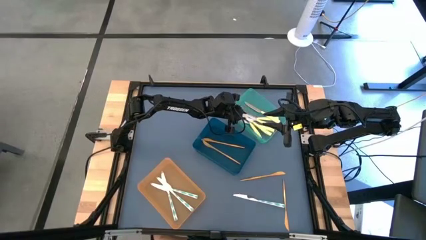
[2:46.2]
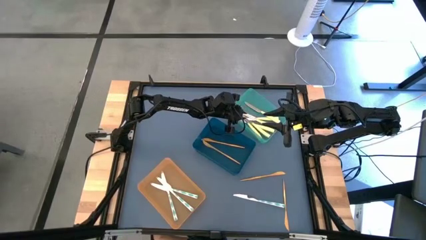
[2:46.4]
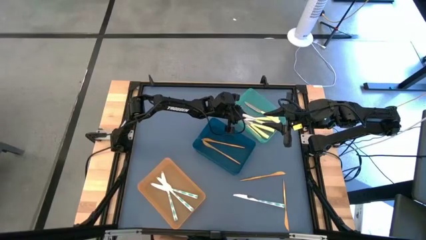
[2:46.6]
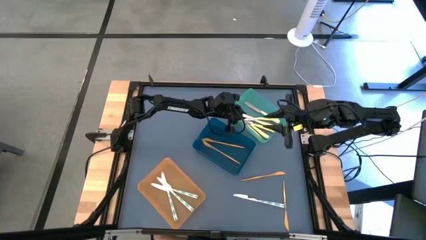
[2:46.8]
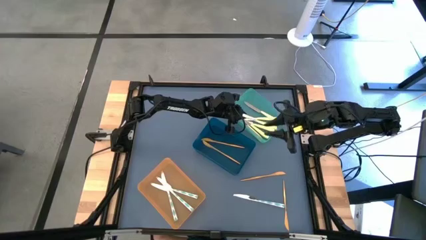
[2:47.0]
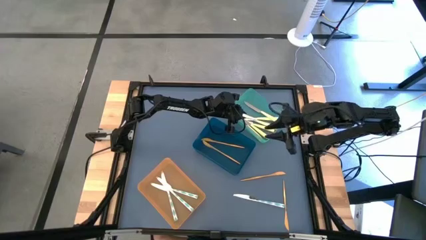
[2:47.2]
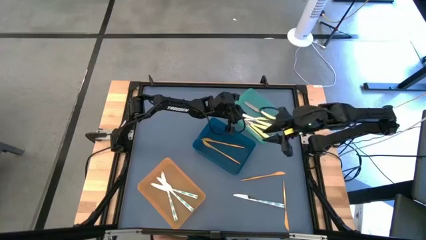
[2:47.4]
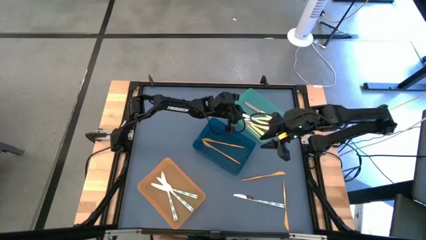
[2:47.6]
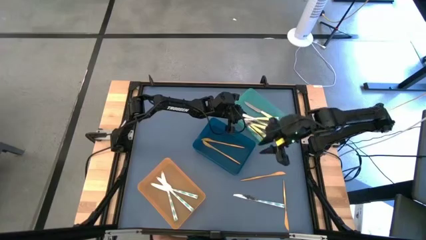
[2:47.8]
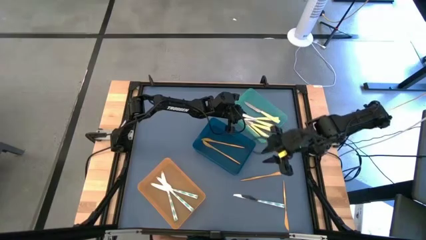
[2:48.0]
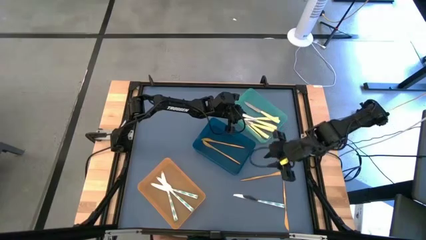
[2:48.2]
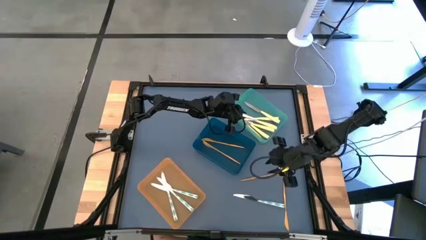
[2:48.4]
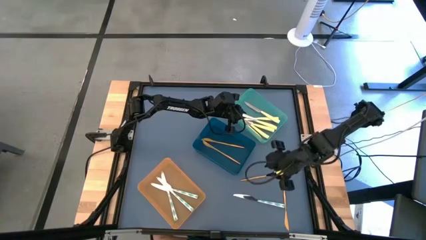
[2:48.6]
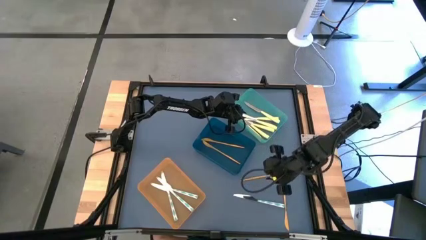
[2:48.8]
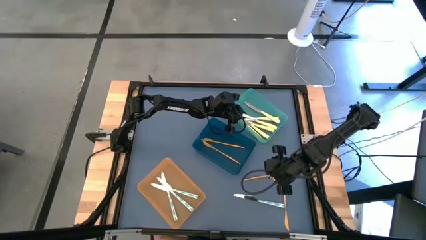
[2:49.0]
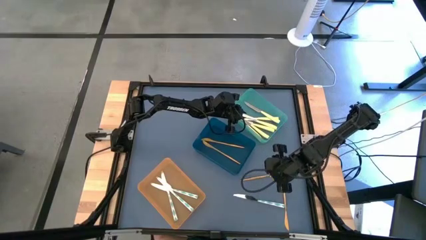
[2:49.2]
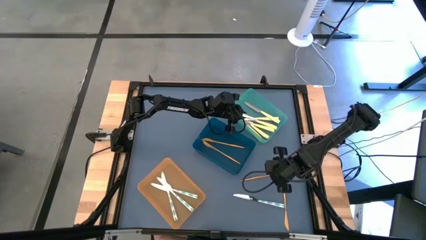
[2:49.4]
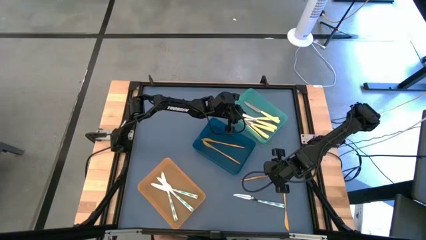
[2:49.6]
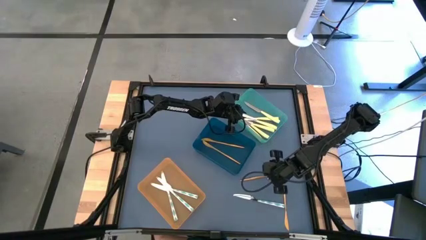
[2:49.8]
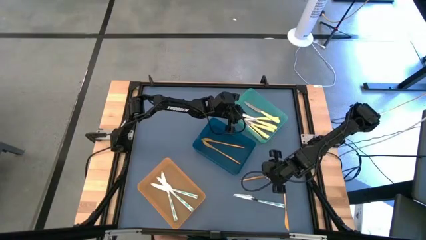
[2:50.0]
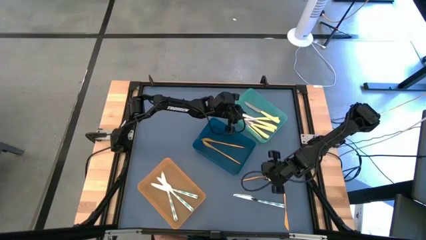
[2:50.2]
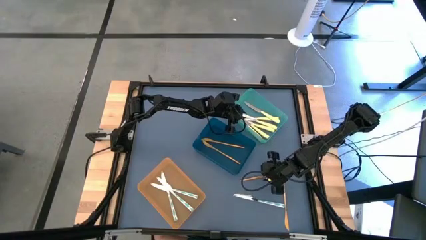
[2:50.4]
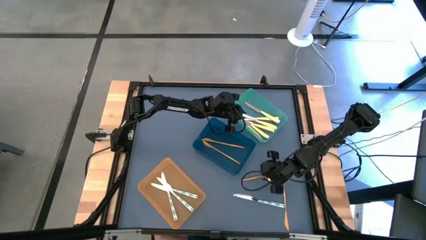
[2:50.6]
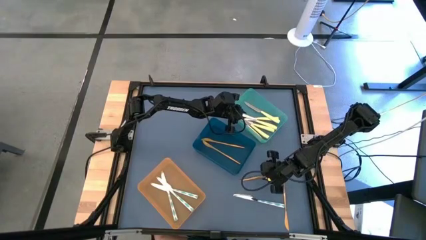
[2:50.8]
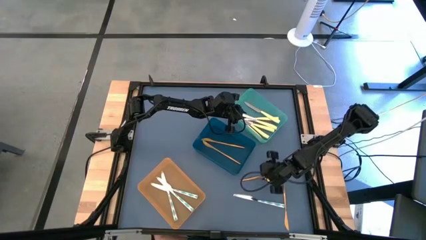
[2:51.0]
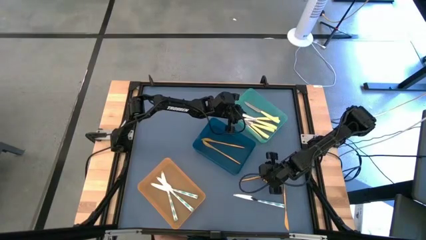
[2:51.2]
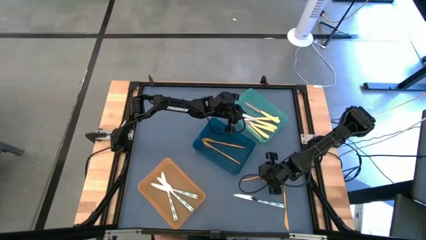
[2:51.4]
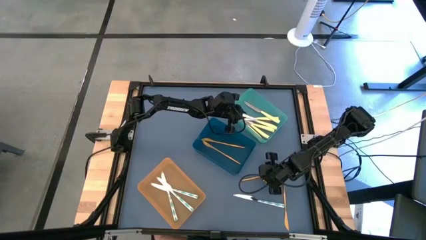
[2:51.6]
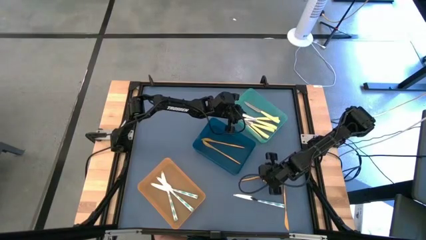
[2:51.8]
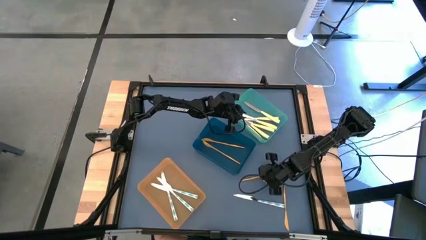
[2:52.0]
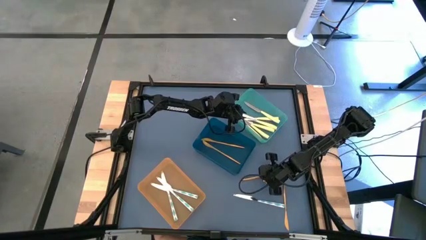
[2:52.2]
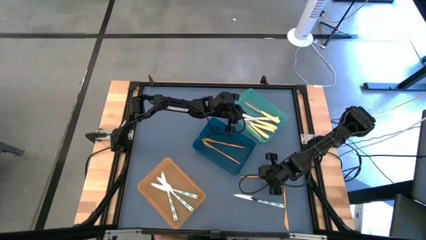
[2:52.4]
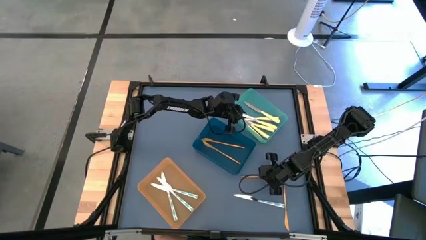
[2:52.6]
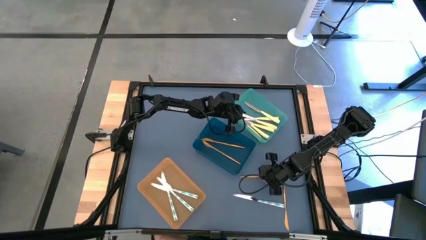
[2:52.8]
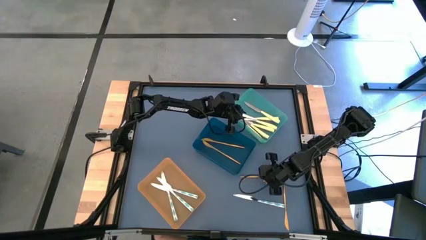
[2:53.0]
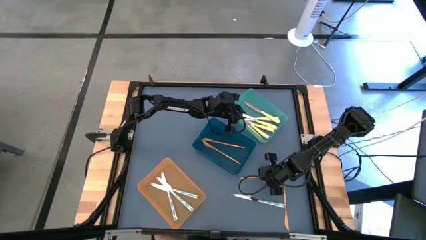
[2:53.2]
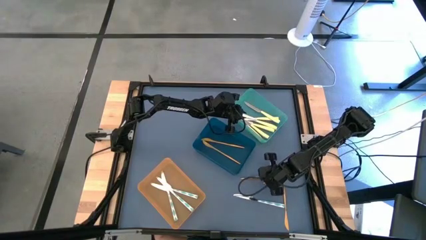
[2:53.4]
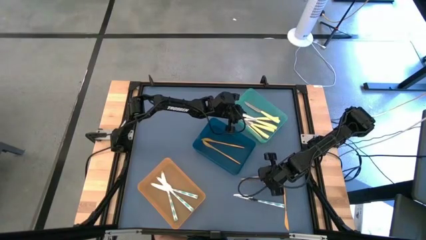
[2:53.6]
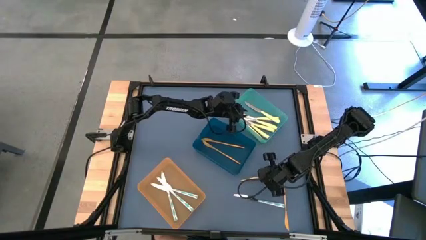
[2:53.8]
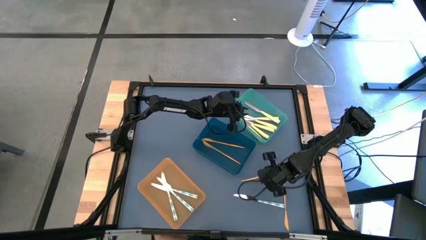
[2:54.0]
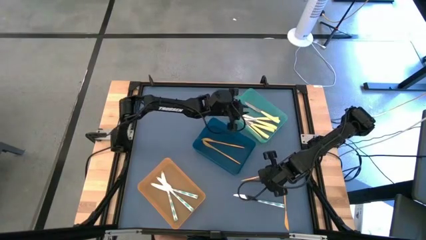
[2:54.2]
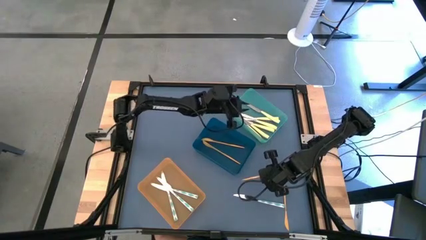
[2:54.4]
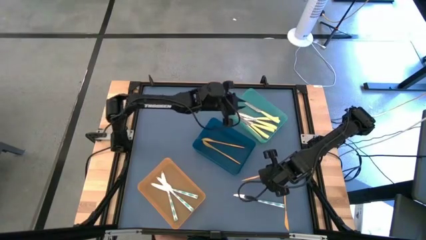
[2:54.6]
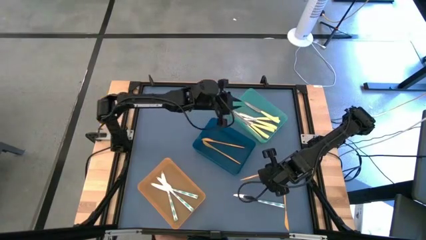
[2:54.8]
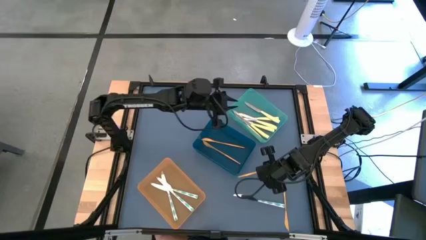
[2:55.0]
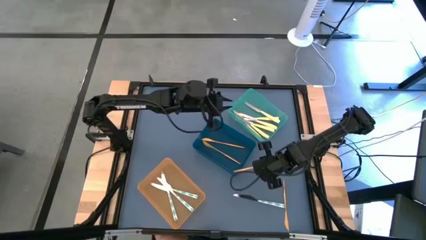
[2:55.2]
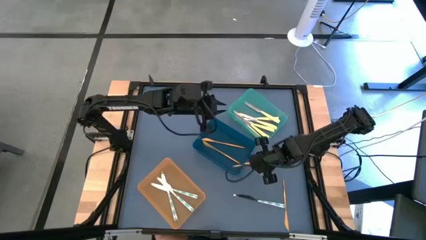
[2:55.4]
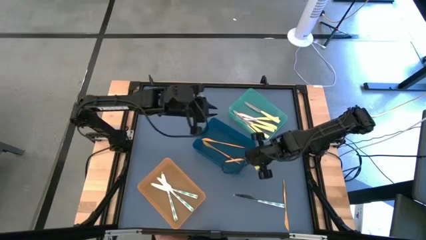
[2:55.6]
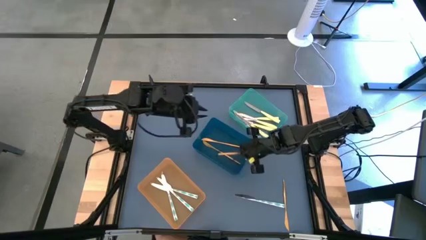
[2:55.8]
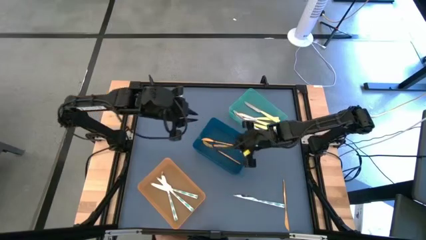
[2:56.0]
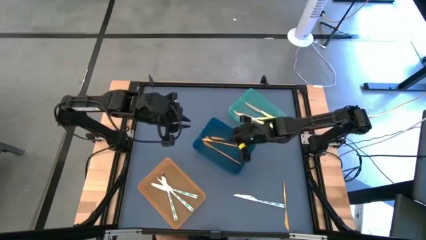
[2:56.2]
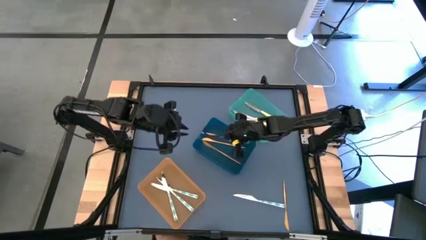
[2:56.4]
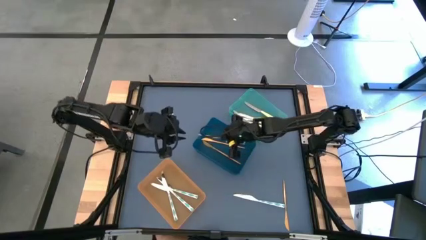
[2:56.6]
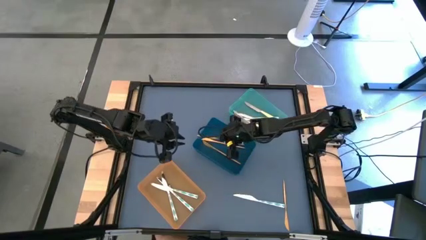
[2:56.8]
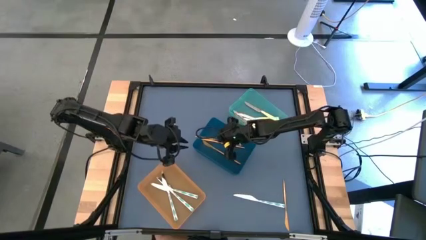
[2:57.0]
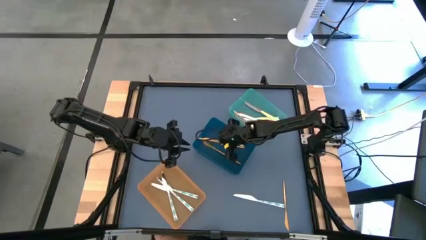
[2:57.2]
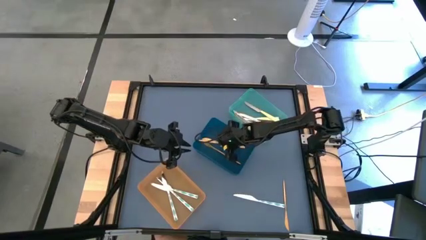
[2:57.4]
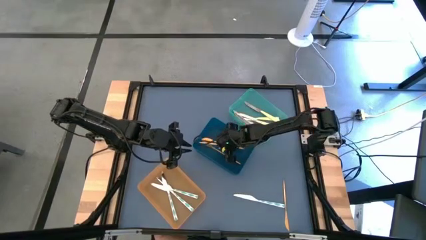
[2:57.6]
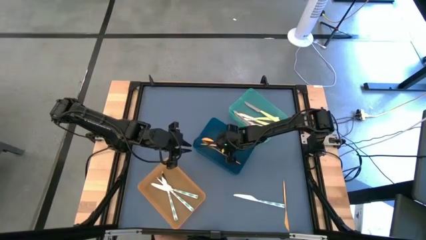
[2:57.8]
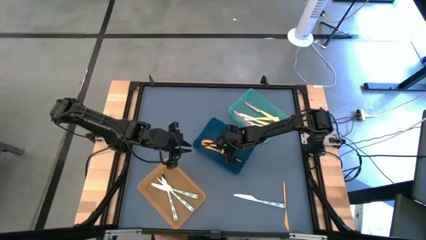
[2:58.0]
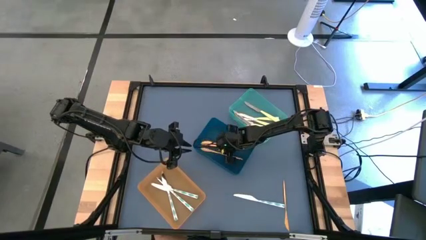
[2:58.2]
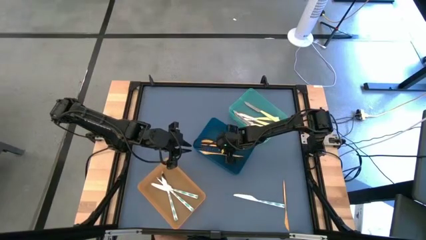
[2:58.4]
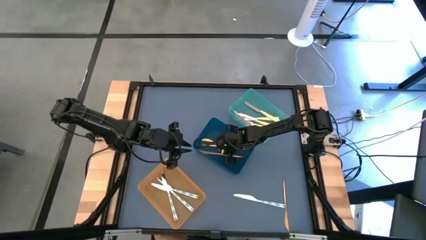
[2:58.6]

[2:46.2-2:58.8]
Task: Sort silverware by color (type)
Put the left gold knife into the dark blue bin

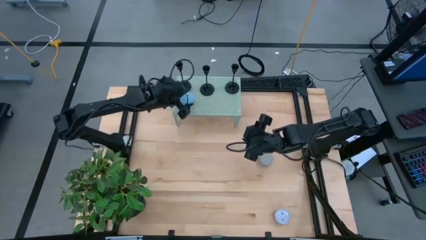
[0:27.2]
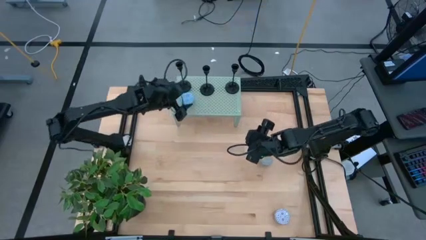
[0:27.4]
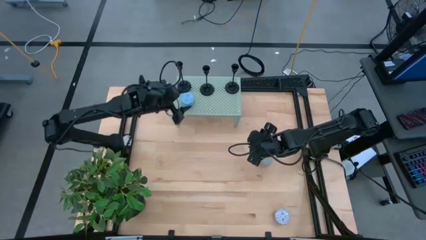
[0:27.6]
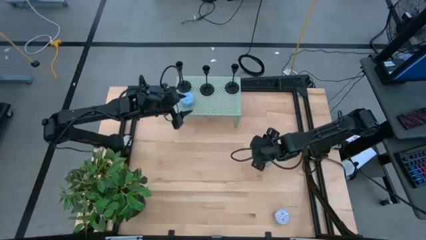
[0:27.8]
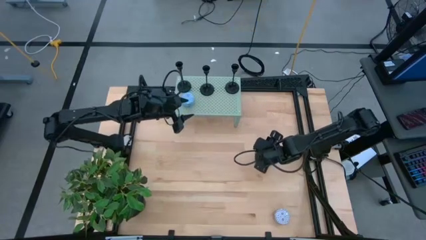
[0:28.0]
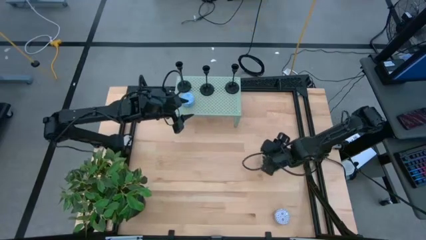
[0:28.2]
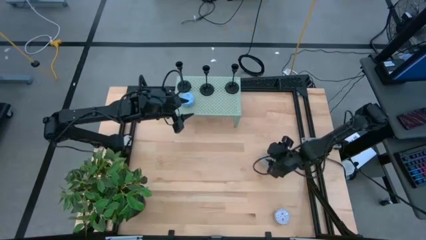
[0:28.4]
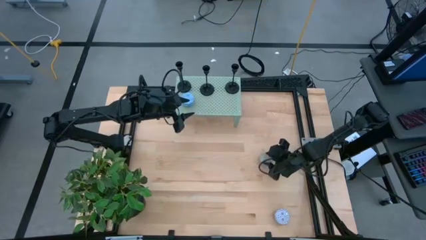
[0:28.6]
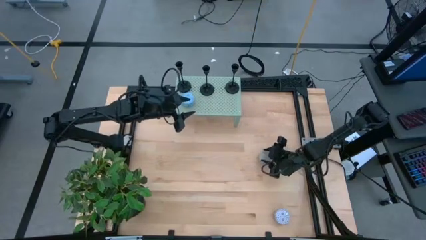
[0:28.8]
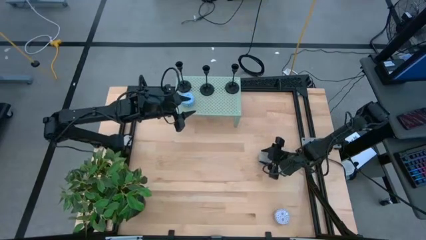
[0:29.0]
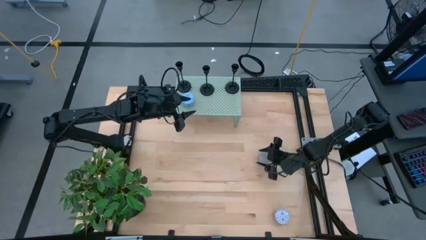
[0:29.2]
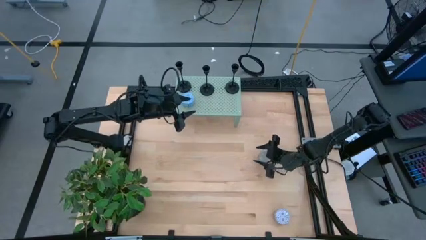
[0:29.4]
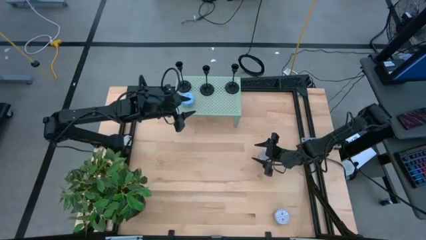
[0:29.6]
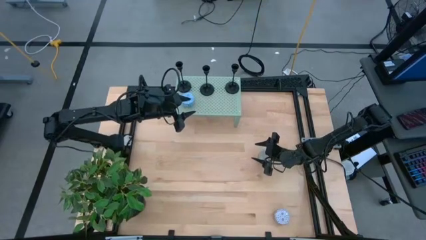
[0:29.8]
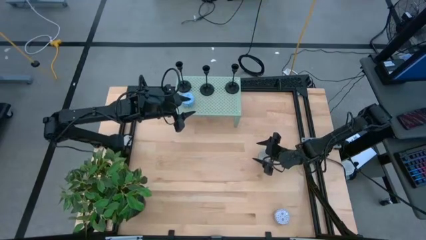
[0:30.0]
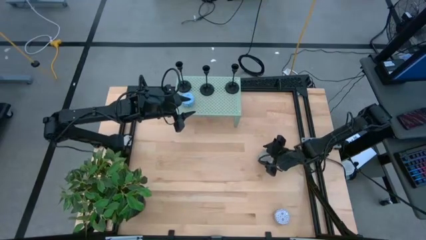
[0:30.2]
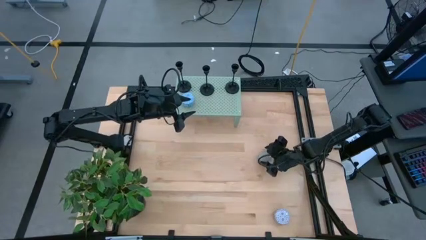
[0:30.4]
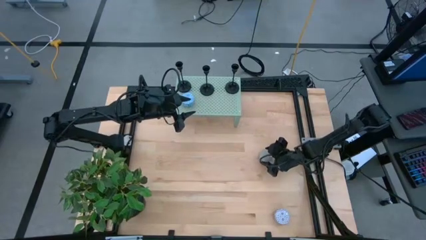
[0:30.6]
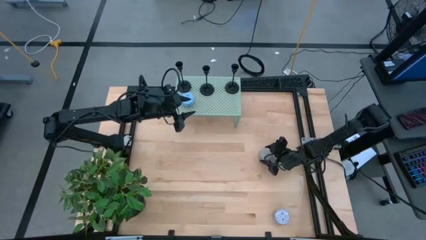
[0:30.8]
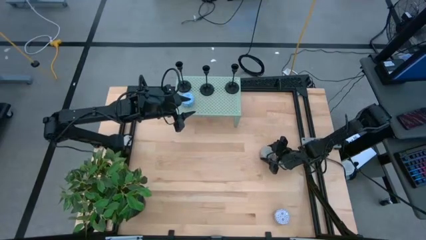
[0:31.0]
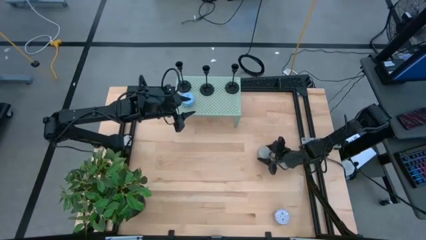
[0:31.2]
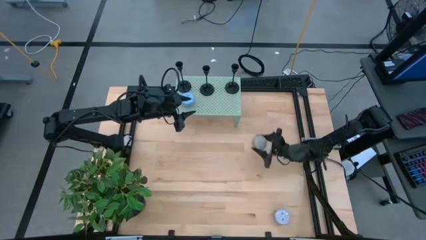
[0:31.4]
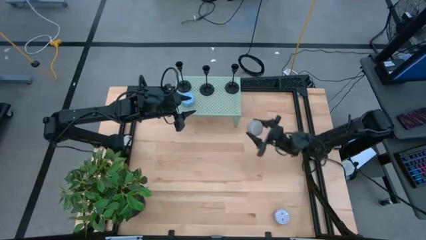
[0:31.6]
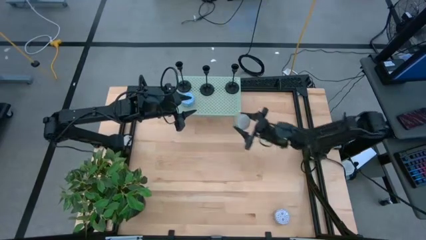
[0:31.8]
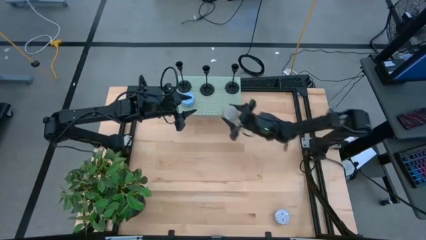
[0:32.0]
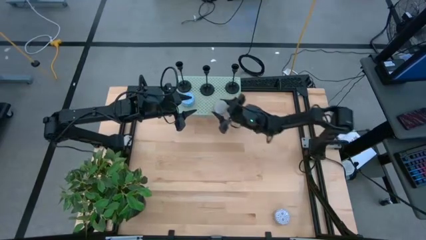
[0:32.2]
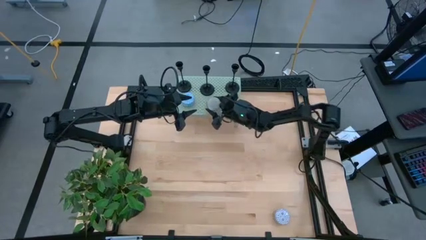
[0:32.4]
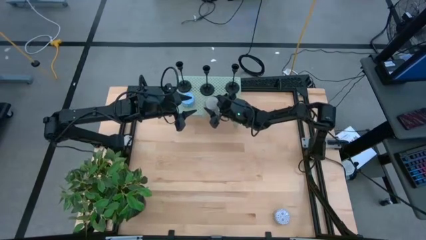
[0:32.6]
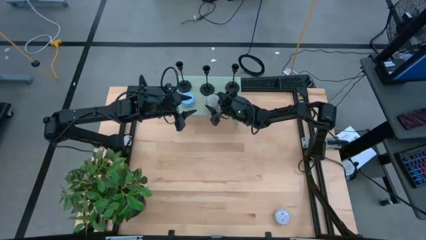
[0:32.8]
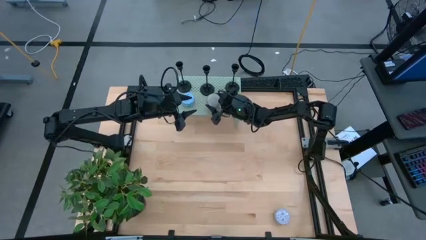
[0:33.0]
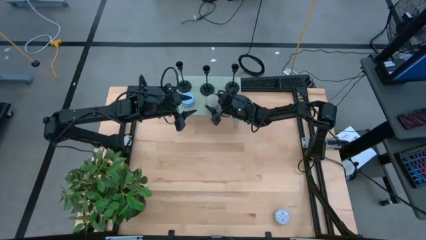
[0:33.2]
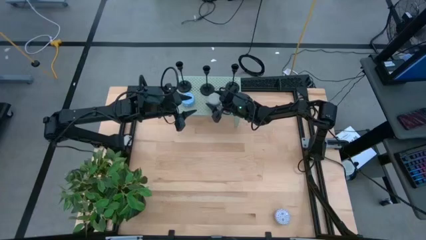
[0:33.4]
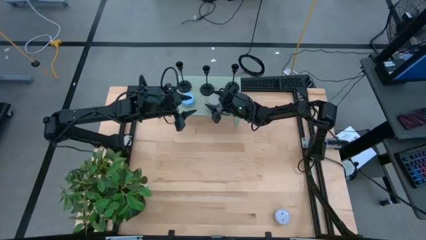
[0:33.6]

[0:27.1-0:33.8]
Task: Pick & Place candle stick holders
Put the blue and orange candle jar on the shelf
